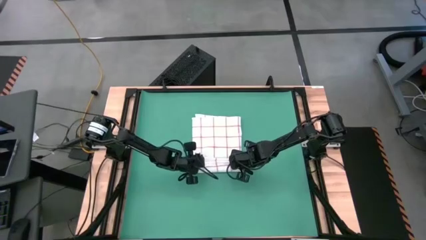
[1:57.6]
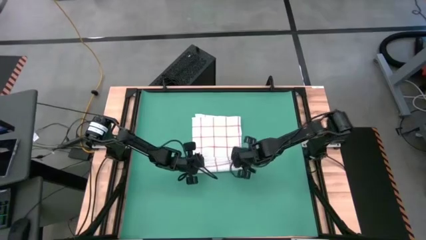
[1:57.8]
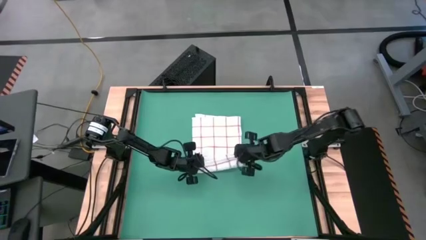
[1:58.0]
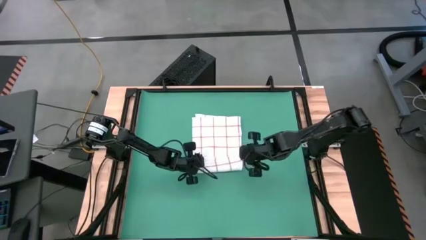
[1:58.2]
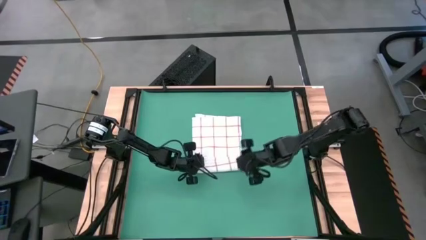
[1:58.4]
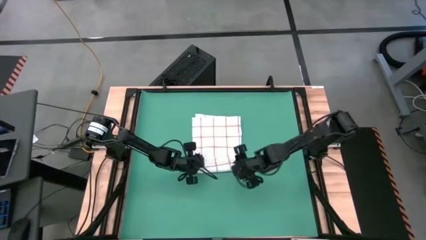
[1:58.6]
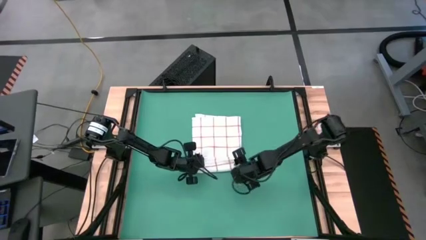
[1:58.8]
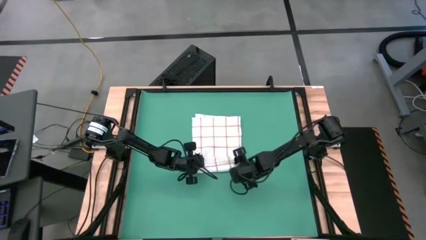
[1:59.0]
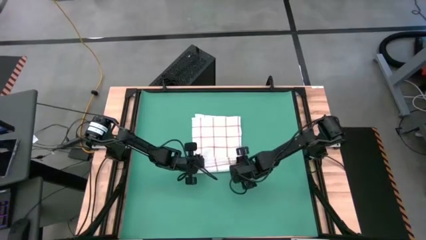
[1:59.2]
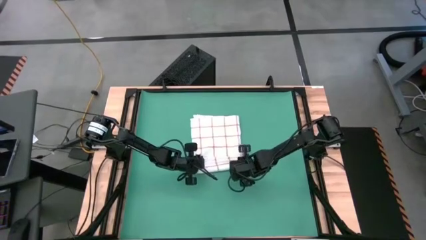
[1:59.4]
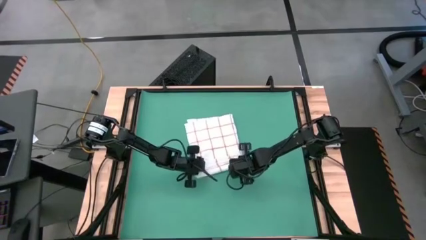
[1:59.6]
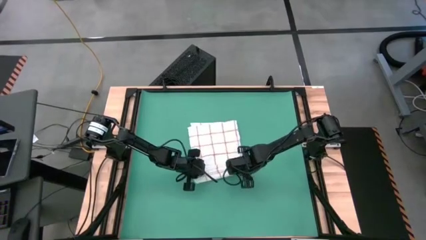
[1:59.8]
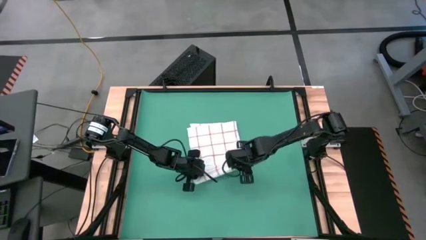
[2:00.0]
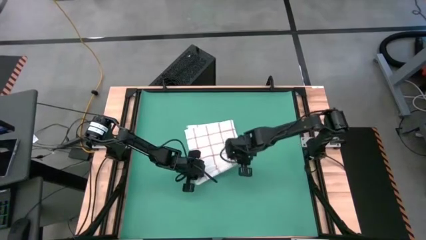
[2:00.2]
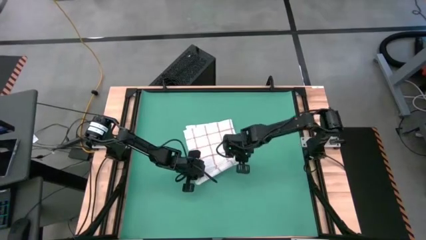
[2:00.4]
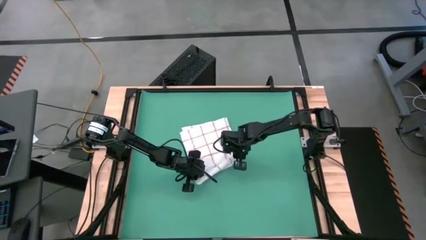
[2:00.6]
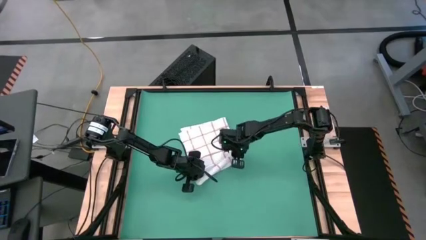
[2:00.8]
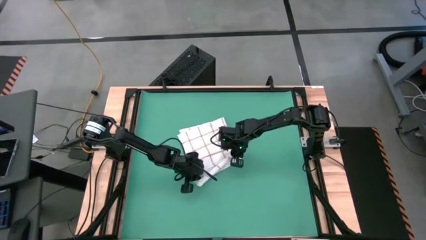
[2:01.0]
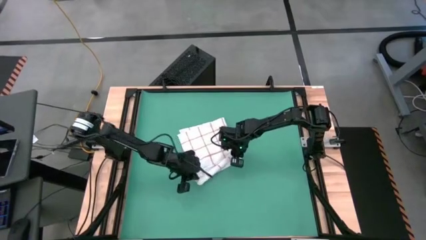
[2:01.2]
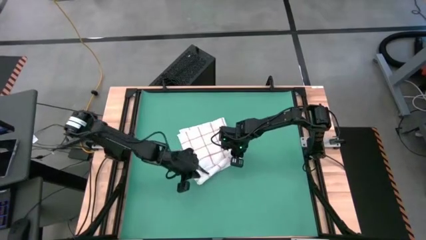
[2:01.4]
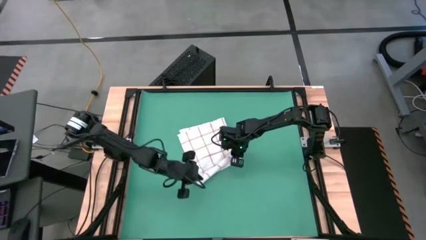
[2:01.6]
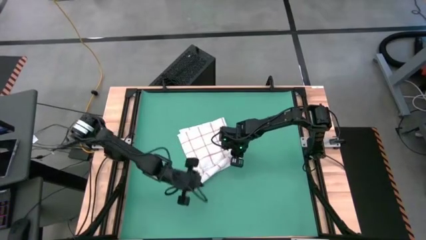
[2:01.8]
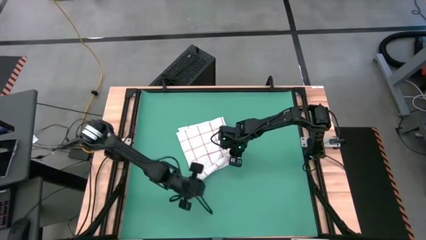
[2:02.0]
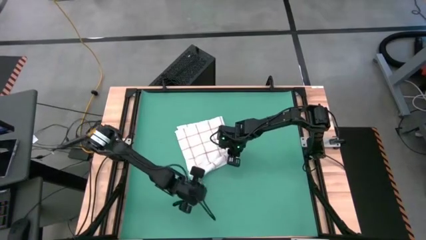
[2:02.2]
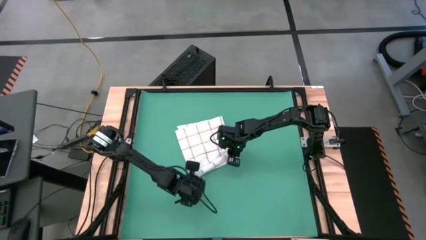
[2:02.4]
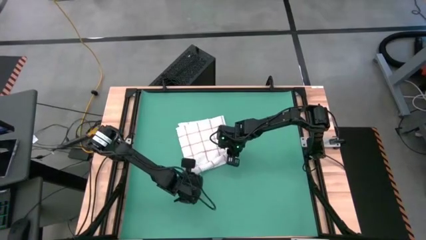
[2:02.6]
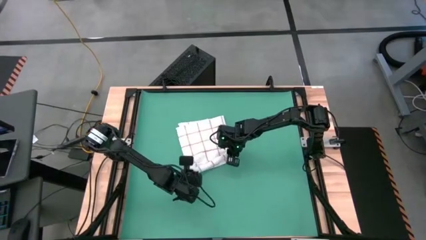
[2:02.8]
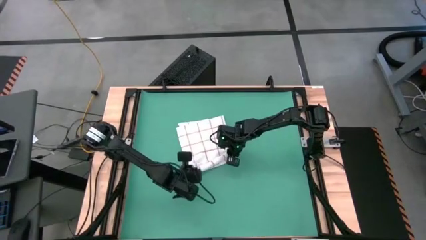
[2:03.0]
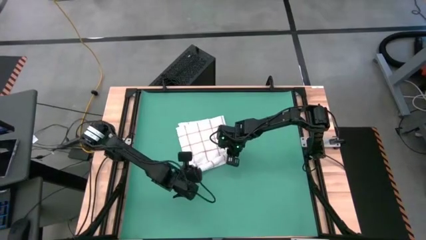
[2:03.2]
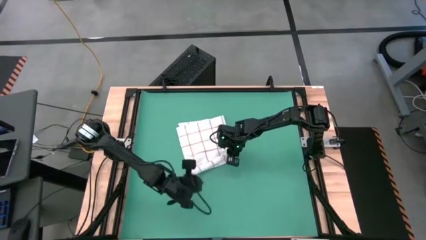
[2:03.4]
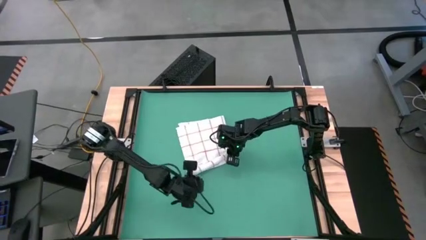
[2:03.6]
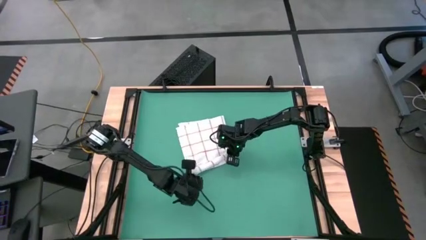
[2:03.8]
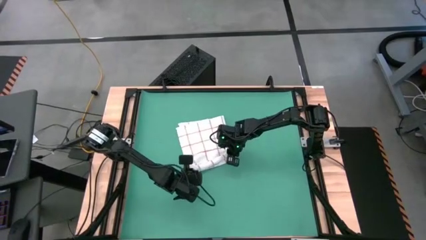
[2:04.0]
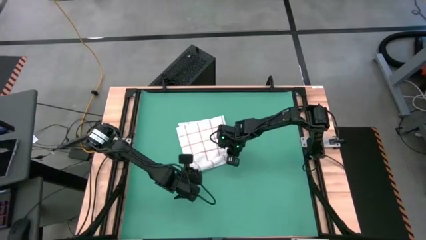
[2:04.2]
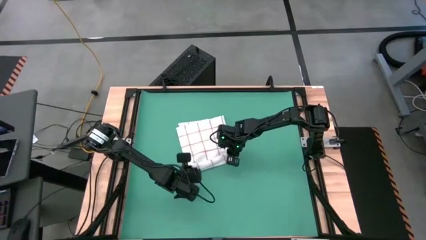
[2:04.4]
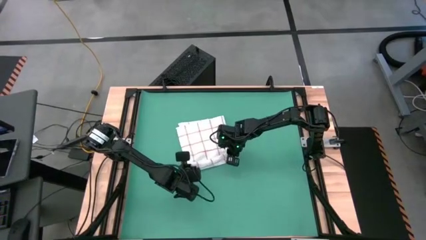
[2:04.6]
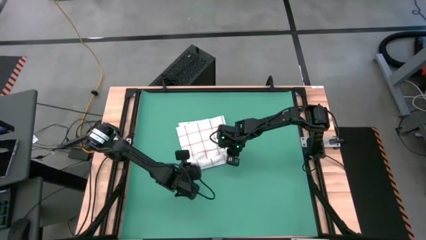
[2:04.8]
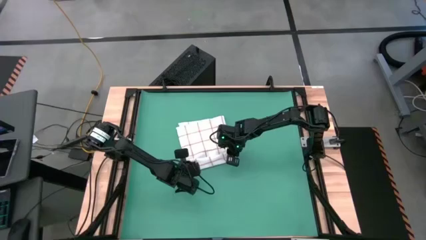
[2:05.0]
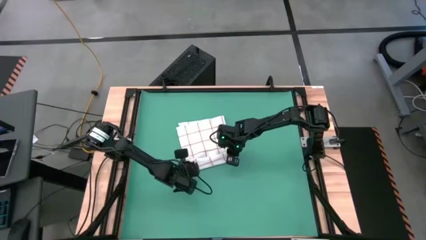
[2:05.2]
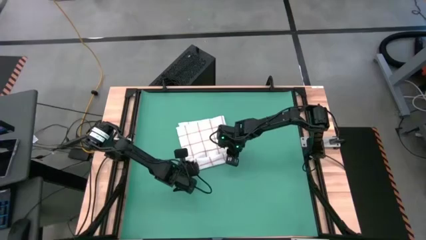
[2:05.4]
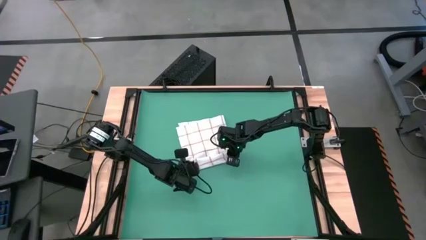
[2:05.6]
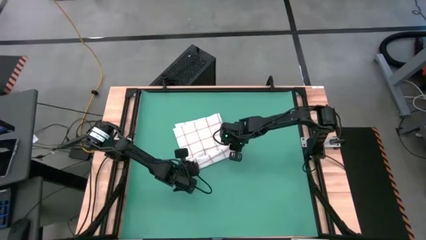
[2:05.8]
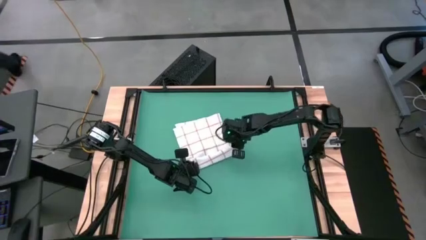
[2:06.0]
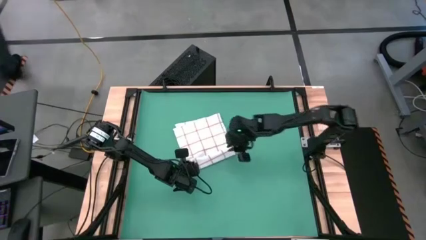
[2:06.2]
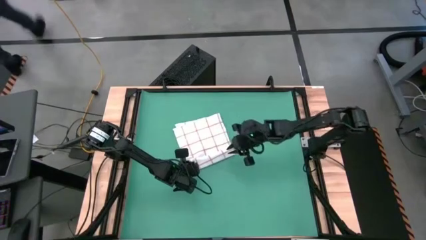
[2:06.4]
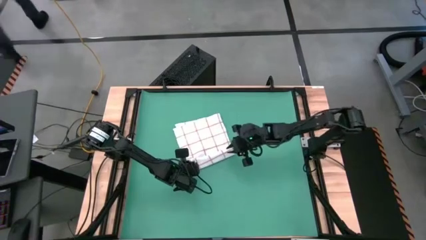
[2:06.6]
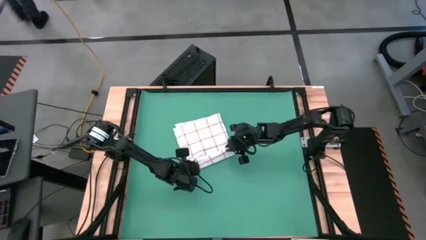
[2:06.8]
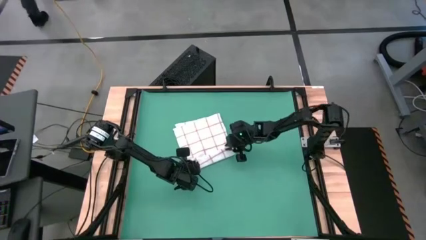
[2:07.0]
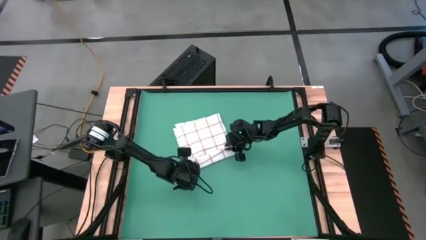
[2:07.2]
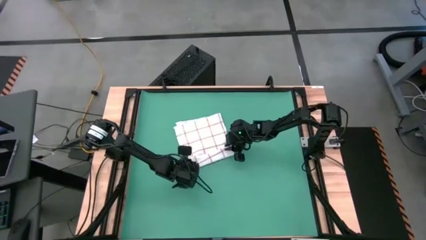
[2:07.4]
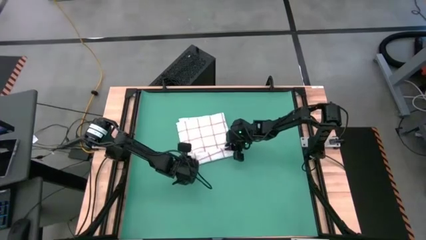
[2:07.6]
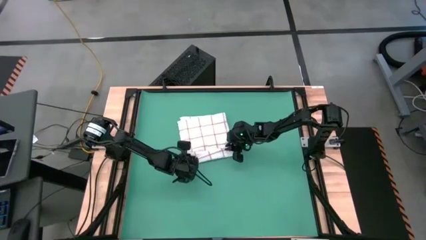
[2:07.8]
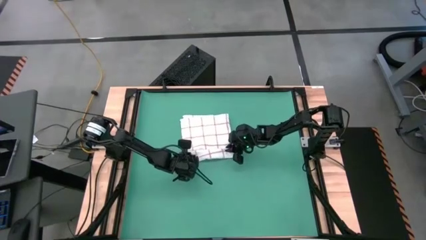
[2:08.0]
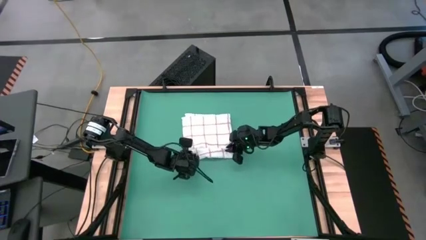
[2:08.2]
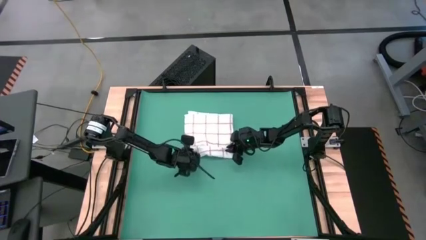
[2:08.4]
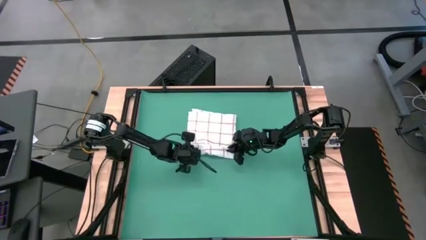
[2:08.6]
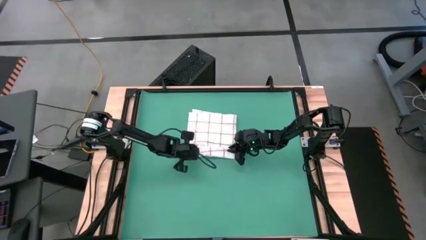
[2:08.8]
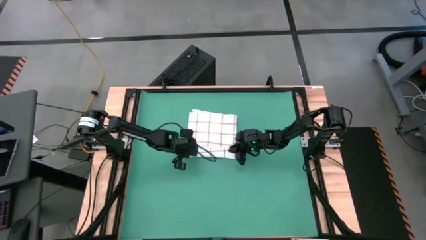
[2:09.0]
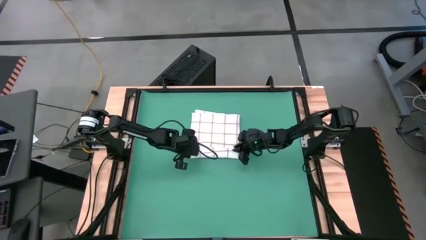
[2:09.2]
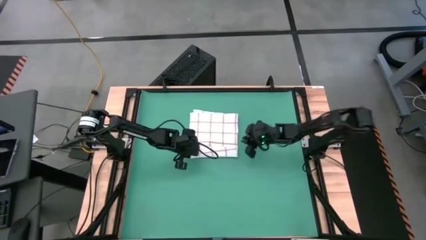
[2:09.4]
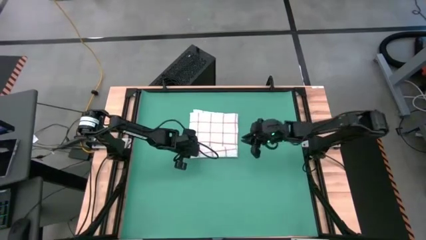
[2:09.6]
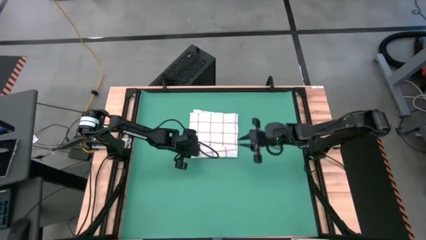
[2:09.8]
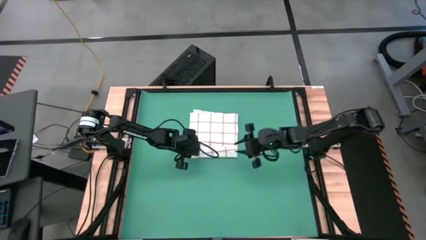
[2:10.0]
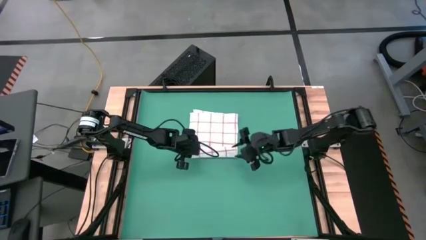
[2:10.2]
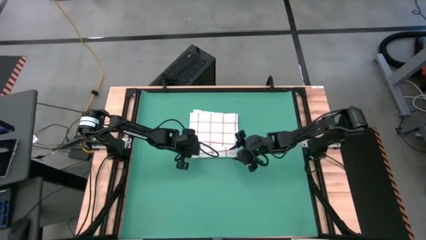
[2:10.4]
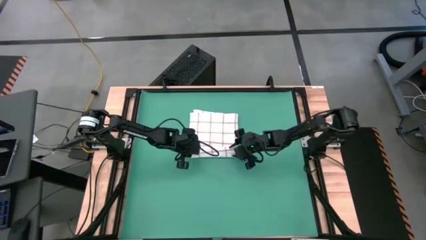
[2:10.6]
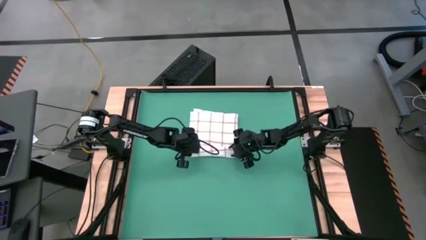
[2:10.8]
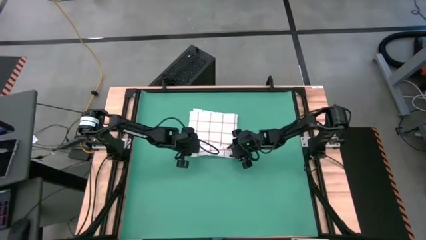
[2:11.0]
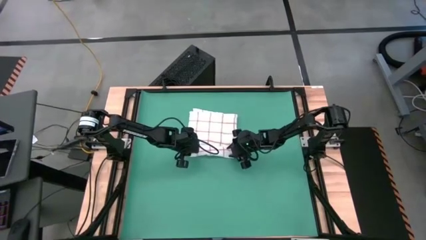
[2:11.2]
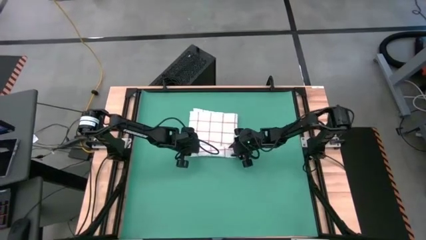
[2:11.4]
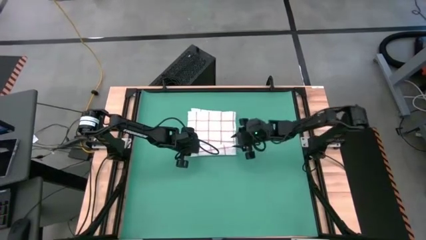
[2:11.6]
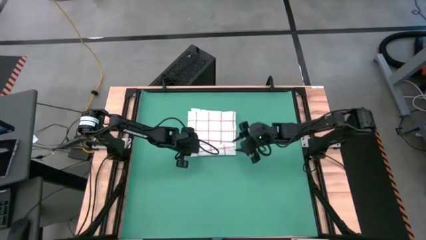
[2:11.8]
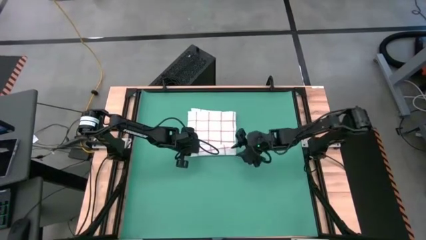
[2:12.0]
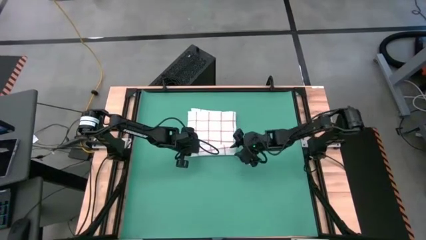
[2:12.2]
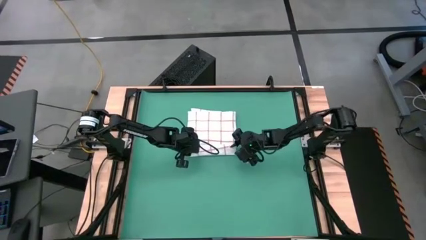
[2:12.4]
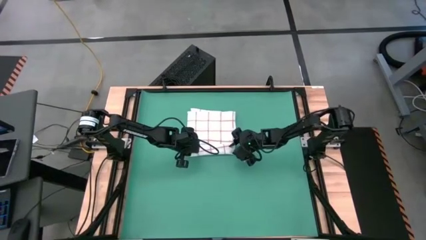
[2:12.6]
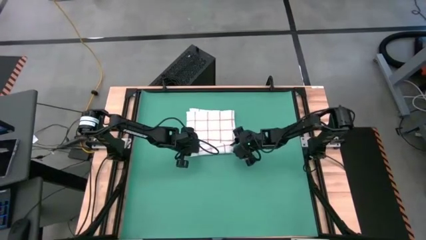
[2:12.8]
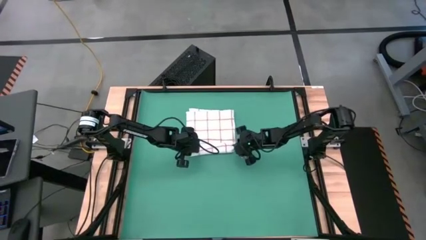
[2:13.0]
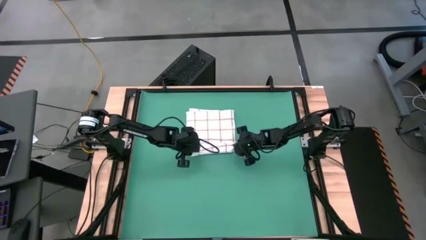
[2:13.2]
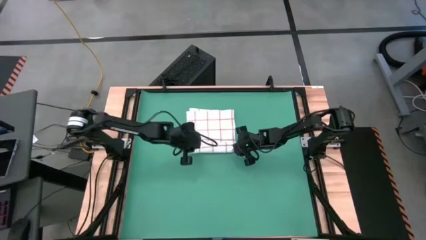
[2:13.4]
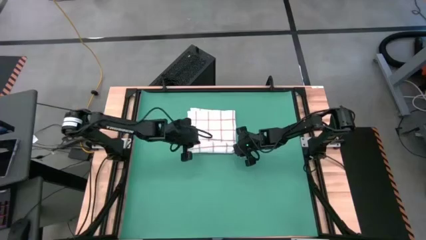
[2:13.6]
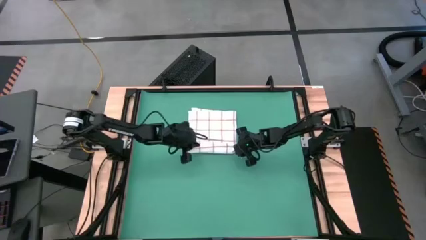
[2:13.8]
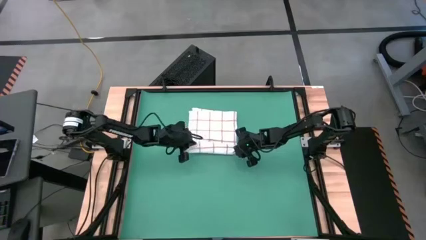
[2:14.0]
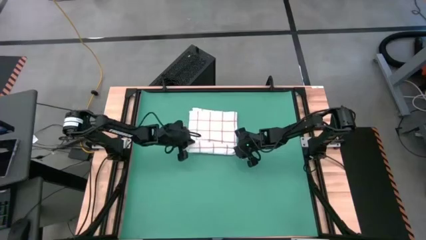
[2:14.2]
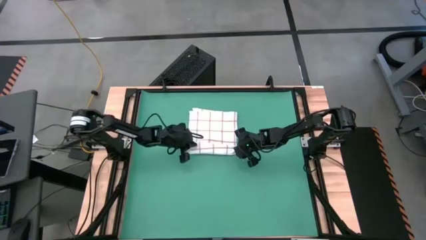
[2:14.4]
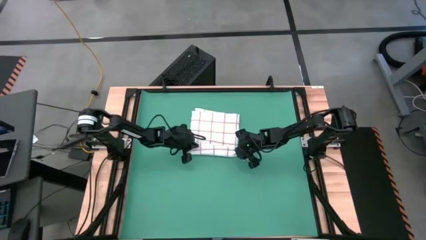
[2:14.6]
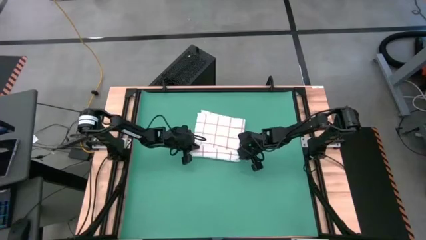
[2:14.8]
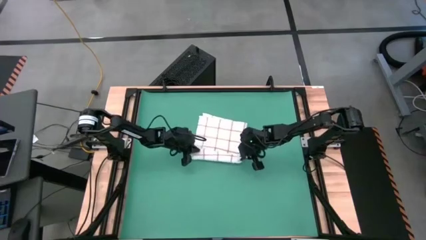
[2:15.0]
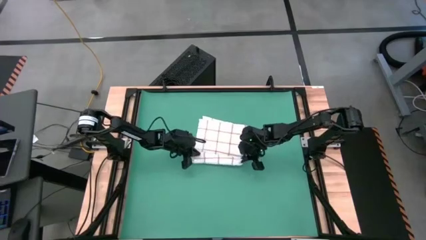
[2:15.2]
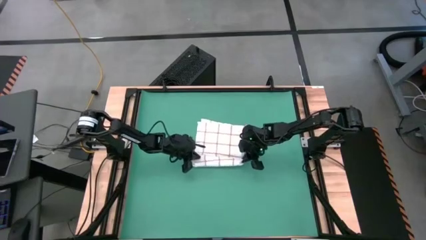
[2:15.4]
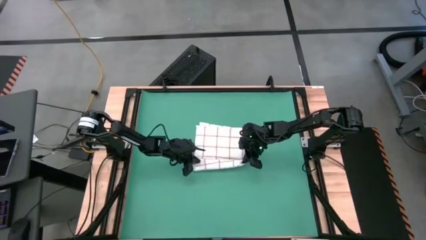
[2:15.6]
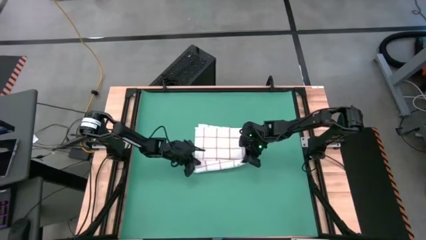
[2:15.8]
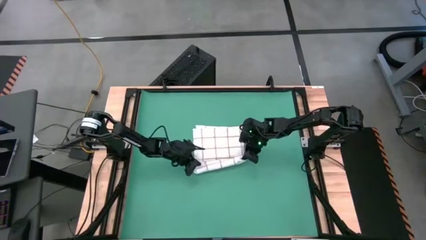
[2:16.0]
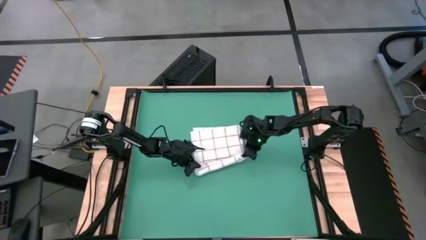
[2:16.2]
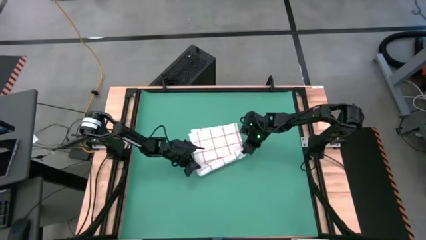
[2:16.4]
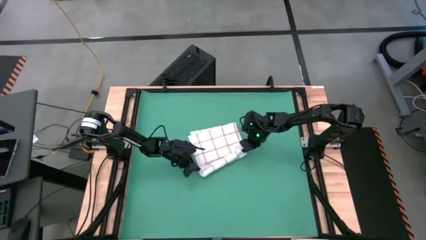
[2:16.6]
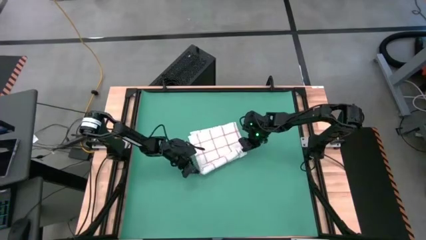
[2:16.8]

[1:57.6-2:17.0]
Task: Roll towel into tight, uniform cylinder
Roll the white towel
